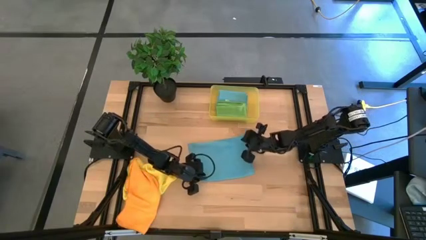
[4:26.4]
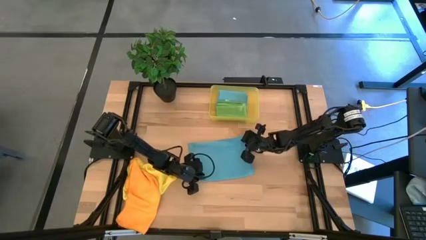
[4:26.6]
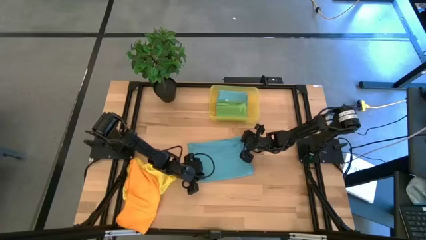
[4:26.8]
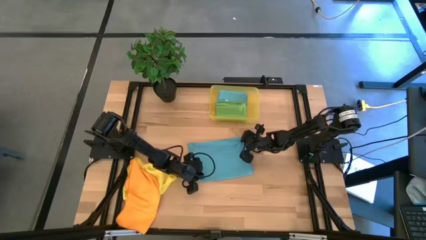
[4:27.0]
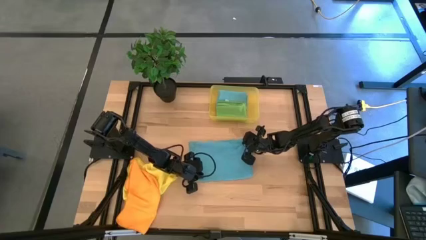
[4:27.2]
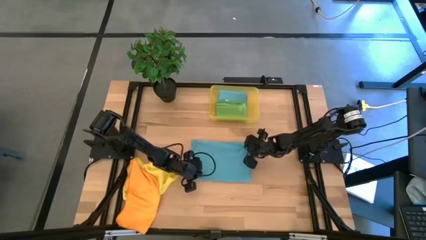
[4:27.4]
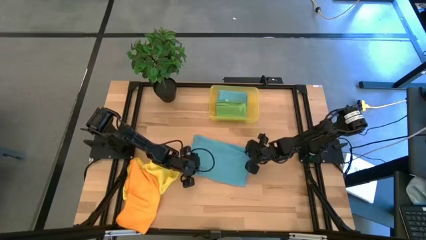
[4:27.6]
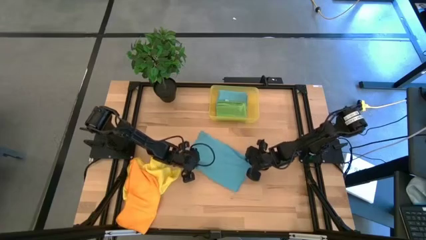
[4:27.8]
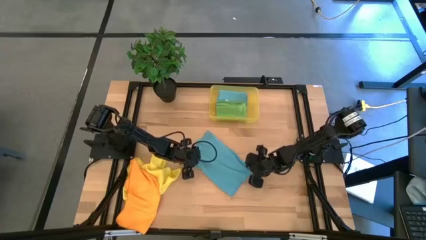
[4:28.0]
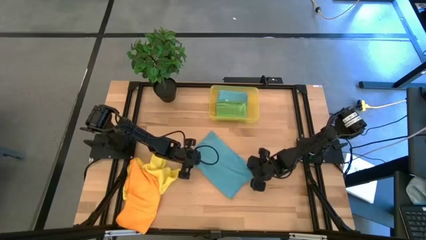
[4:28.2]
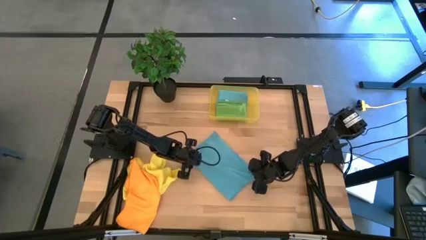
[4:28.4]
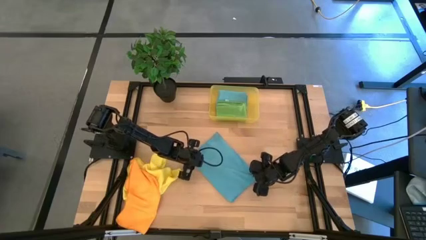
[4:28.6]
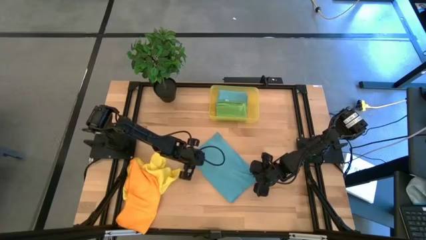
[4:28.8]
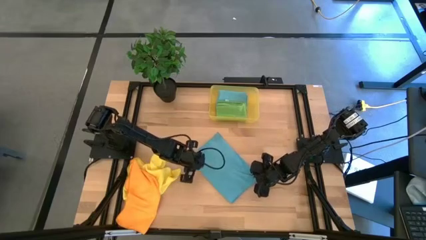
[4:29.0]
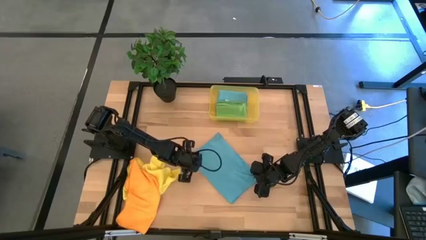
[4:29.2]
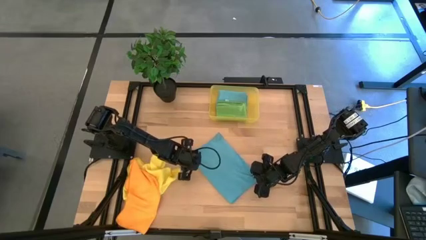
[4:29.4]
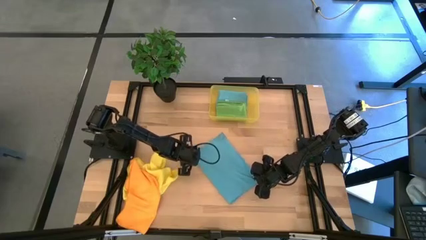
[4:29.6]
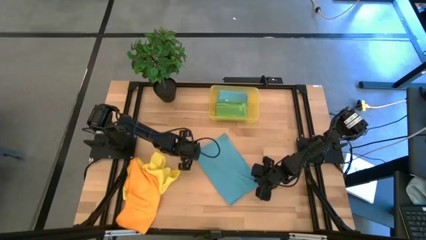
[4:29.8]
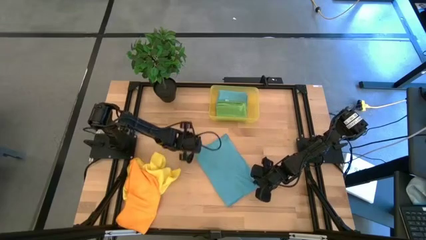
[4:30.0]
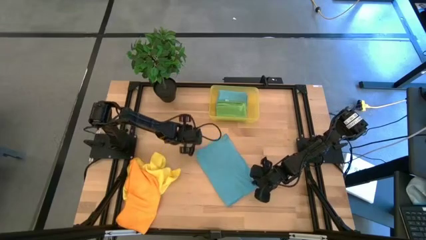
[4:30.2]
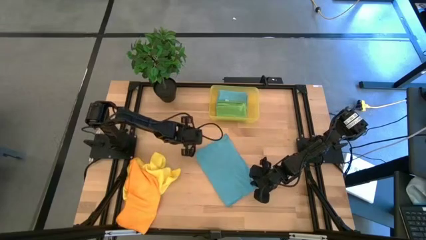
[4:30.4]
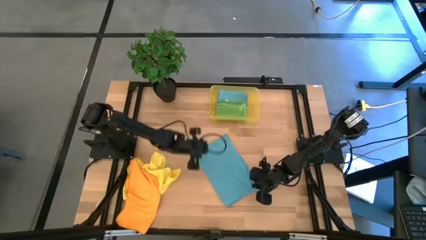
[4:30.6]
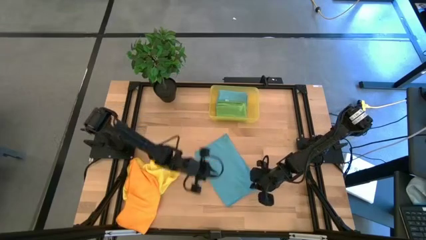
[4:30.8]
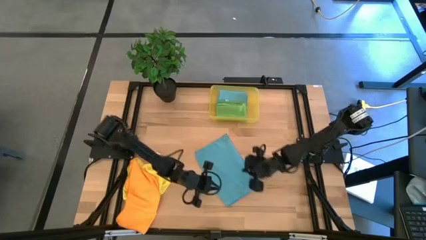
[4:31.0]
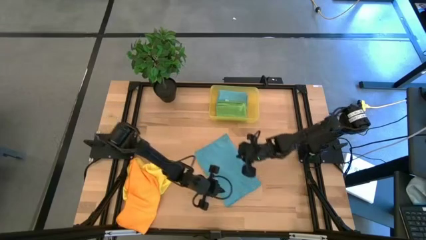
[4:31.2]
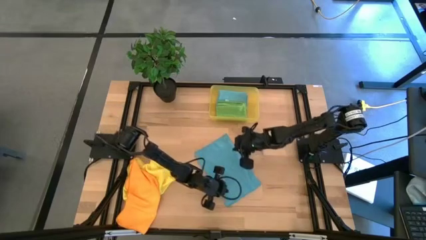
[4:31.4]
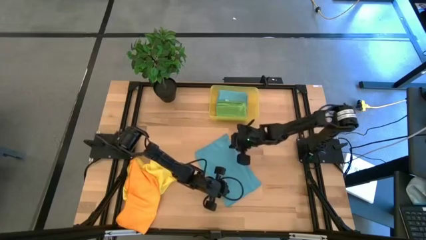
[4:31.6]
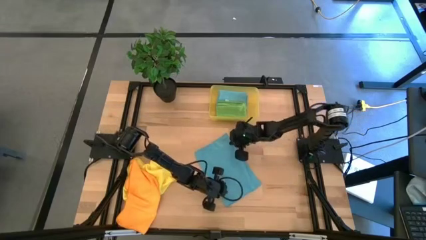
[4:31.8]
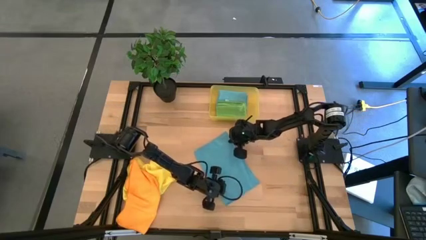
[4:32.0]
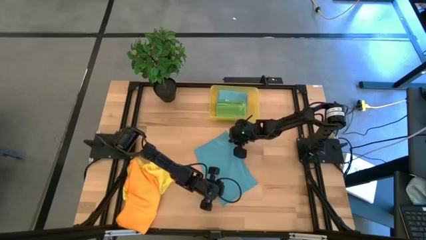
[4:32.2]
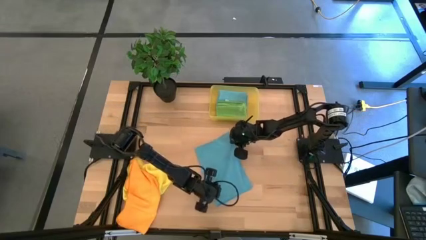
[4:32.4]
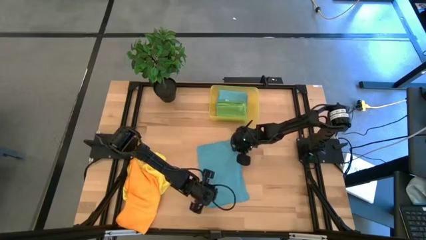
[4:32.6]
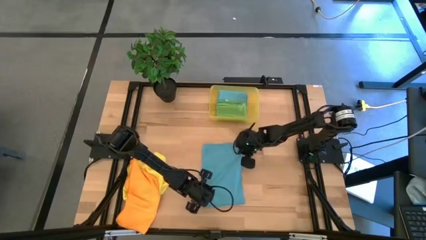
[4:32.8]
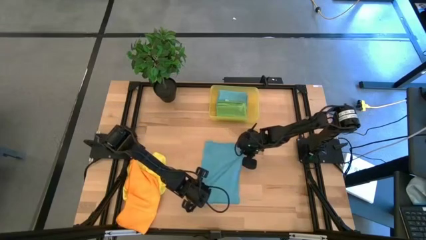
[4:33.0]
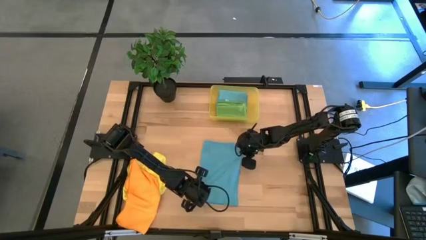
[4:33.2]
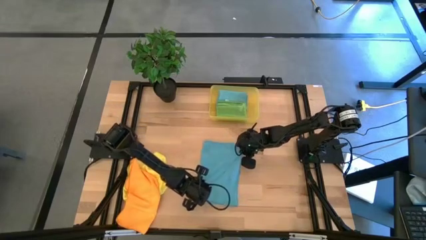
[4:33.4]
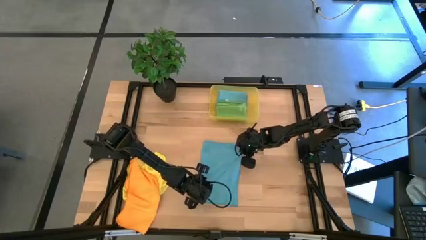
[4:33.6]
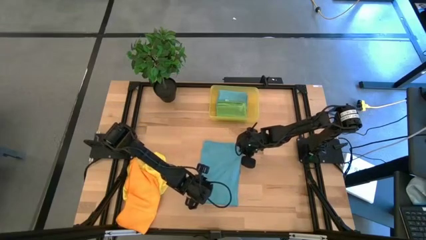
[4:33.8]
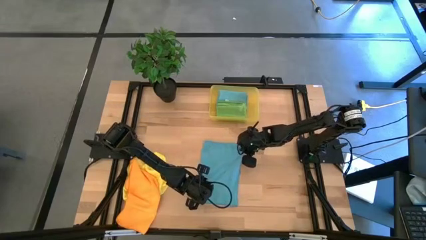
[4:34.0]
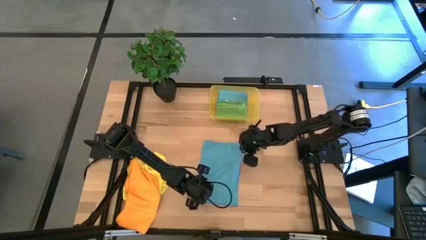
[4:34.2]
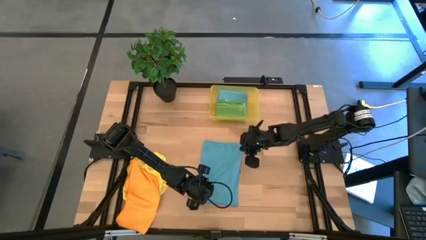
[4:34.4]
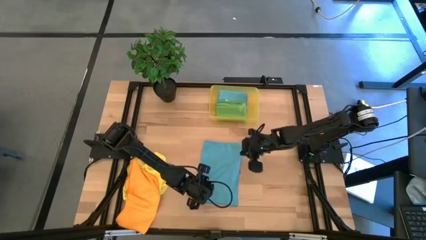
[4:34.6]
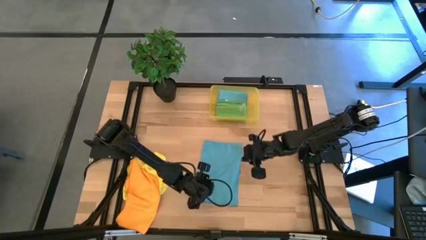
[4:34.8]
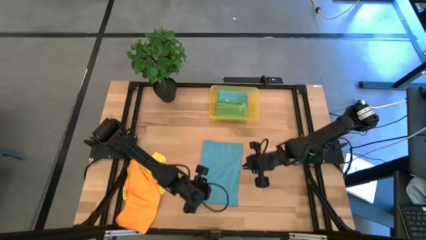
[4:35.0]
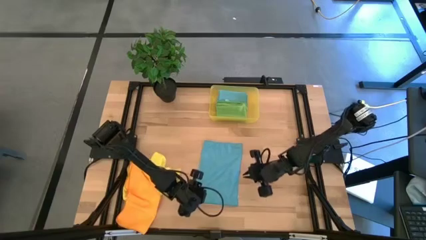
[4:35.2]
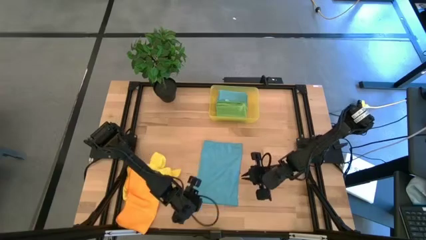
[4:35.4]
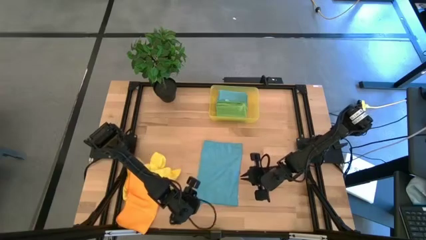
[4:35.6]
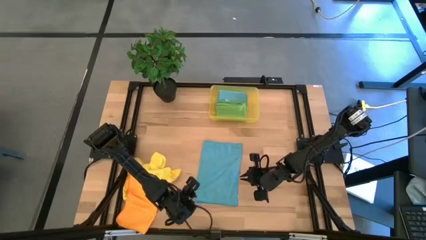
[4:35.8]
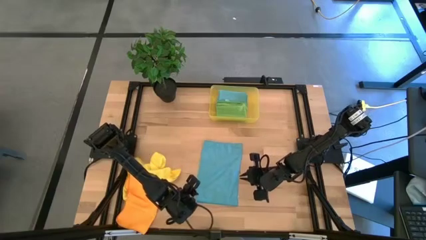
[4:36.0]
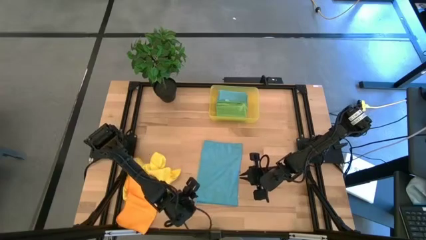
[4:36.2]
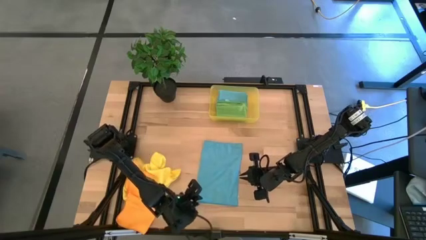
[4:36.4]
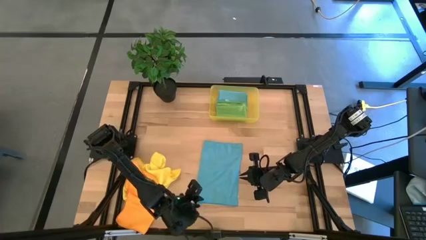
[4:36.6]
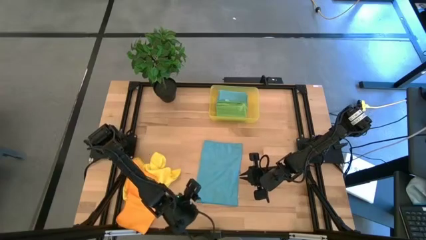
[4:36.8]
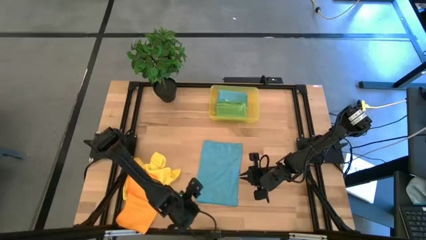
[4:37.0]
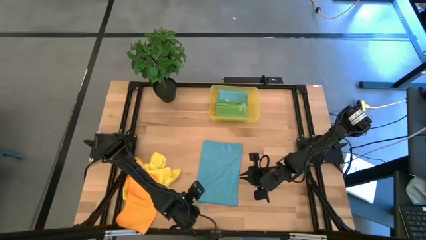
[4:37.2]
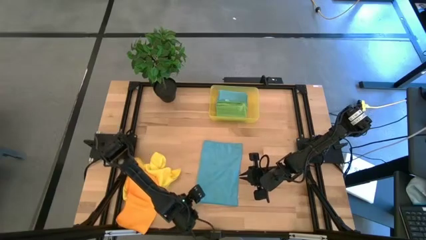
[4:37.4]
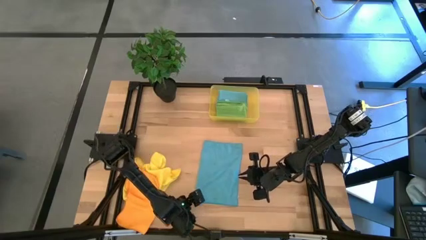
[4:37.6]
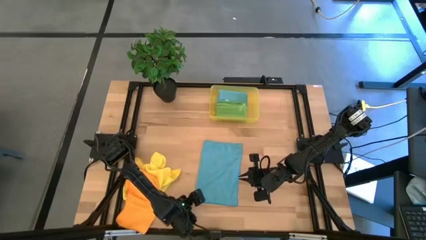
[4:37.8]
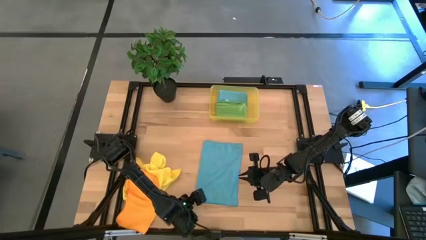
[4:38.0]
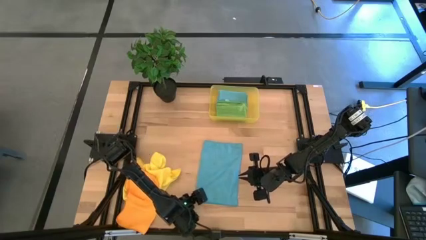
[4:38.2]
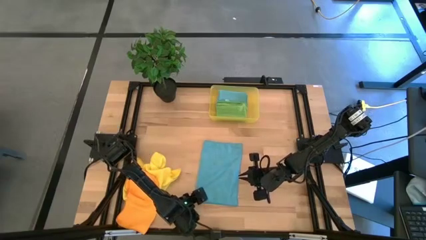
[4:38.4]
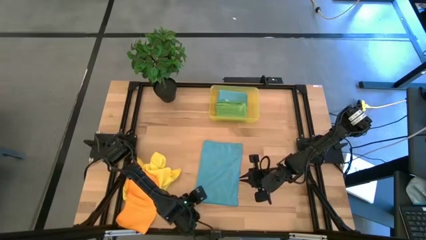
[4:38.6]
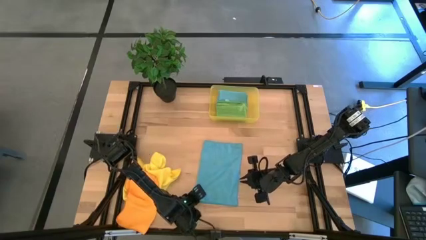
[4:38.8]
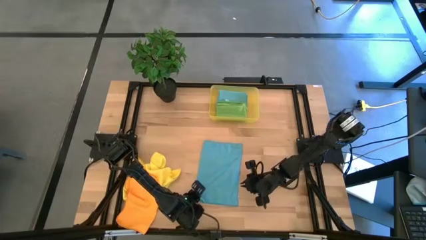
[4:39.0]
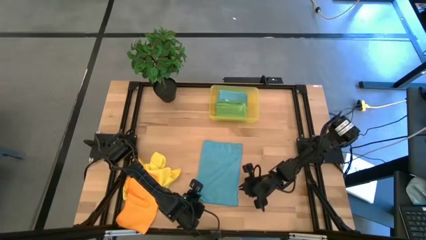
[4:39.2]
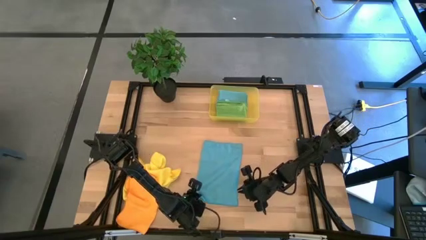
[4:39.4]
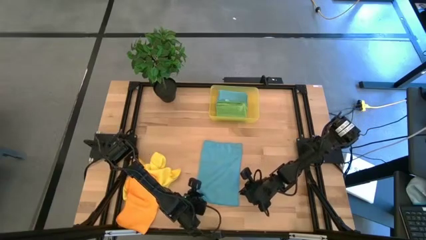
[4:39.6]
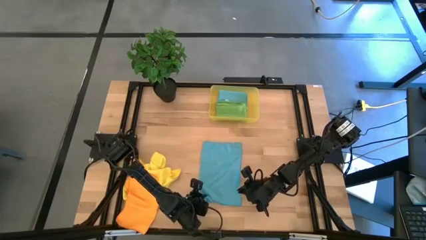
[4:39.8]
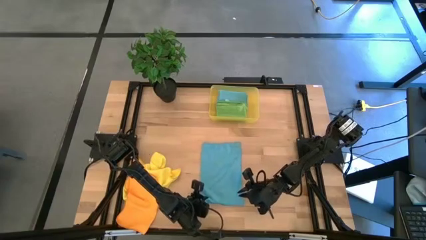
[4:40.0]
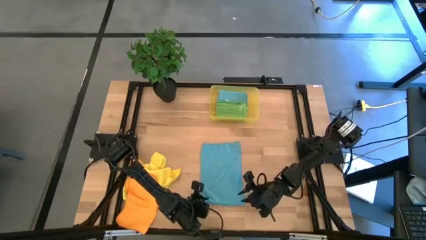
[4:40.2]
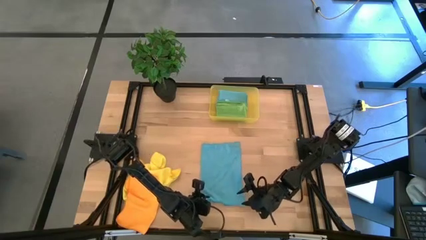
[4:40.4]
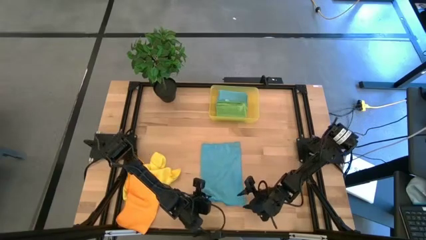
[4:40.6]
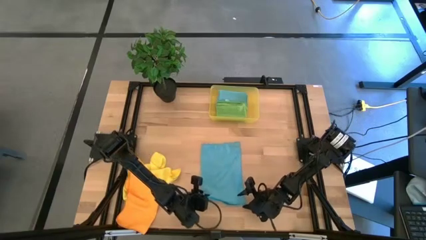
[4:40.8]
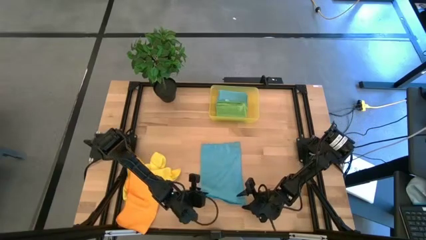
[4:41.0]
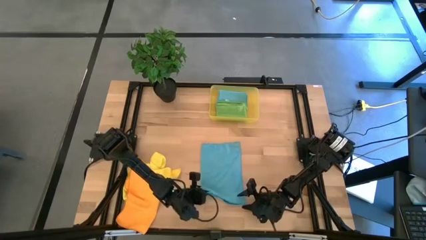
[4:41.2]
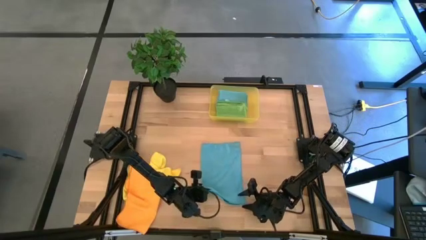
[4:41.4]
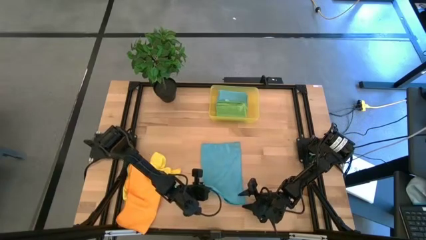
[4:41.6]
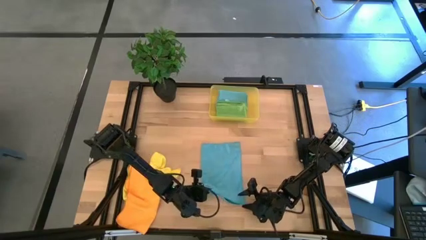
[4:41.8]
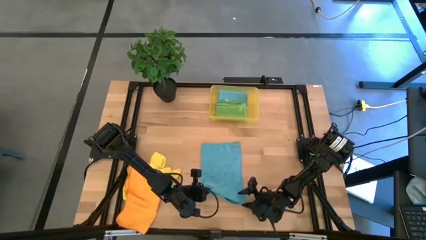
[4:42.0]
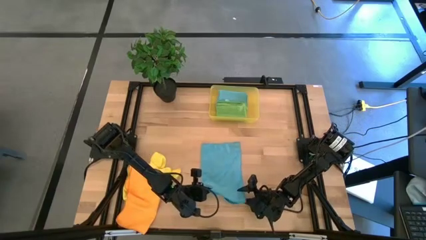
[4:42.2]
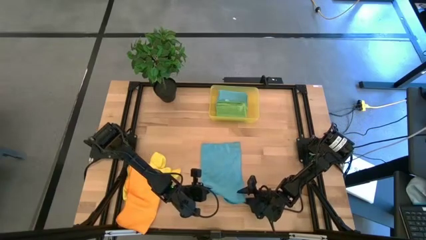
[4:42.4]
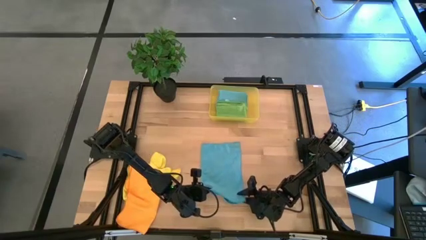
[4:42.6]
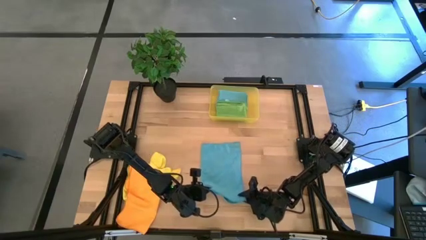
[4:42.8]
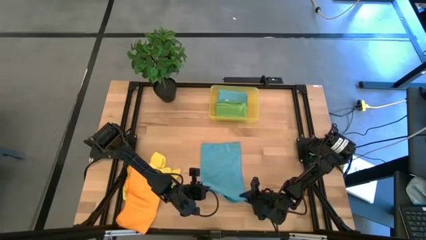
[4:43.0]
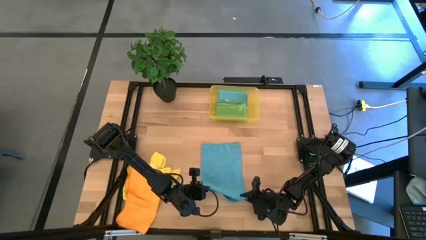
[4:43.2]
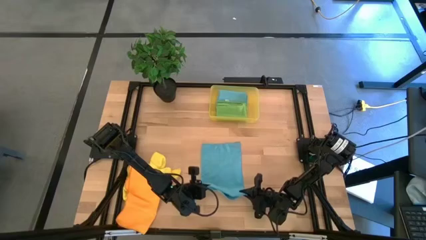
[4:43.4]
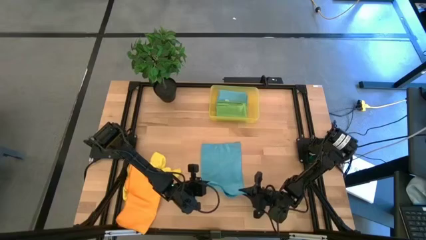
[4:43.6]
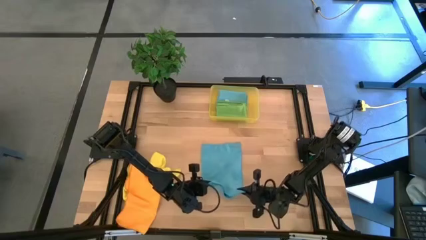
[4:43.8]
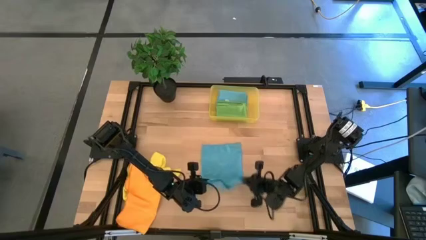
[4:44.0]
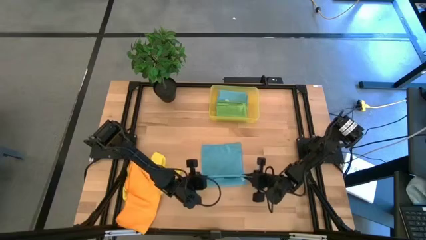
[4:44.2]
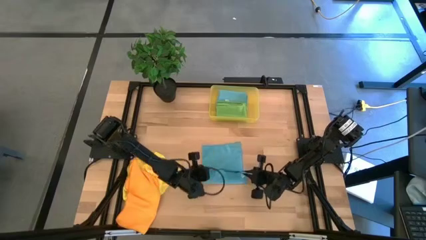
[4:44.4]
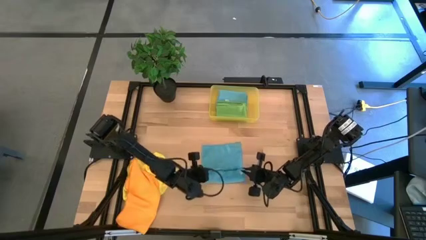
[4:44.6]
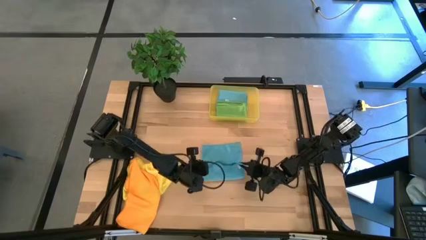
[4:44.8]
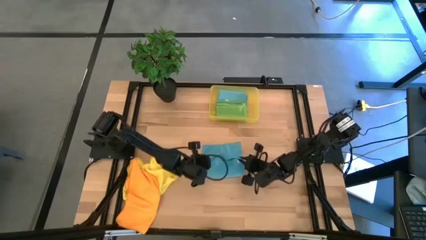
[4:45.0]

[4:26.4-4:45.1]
Task: Fold microfiber towels
Fold the blue microfiber towel
